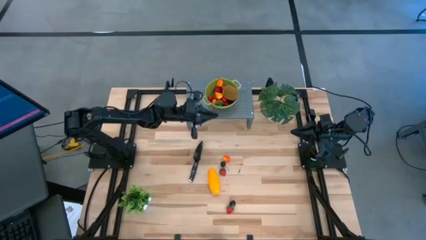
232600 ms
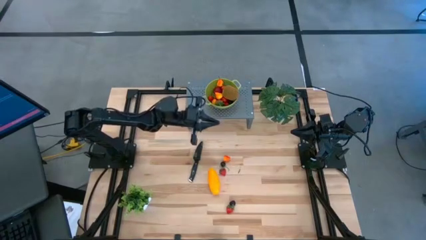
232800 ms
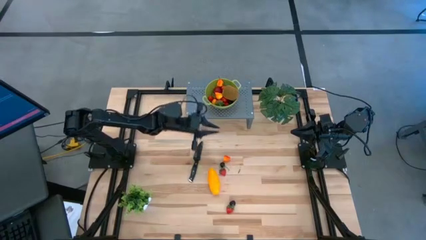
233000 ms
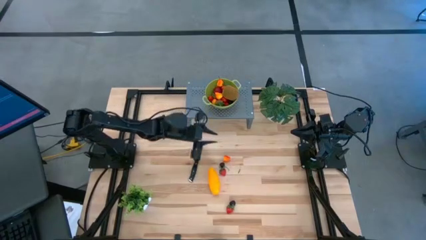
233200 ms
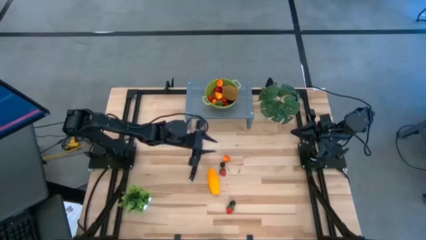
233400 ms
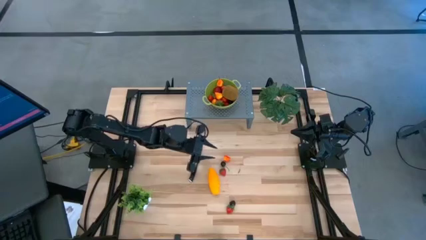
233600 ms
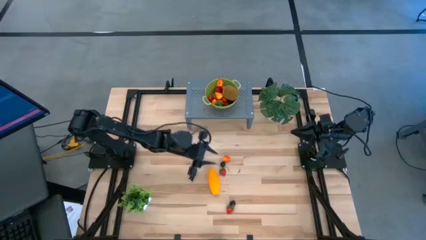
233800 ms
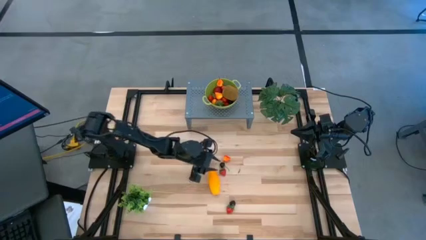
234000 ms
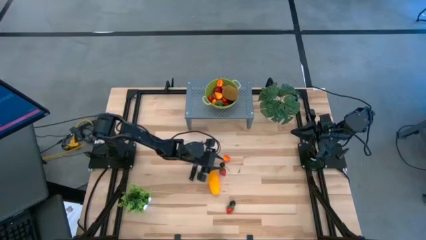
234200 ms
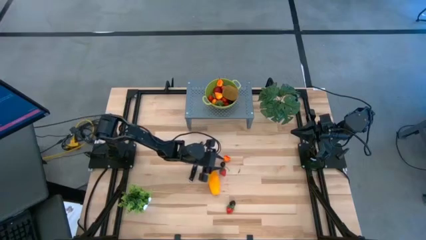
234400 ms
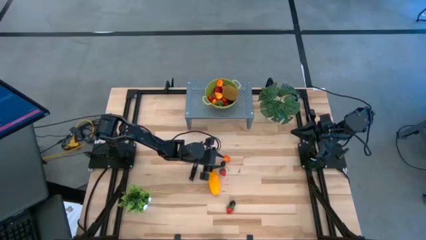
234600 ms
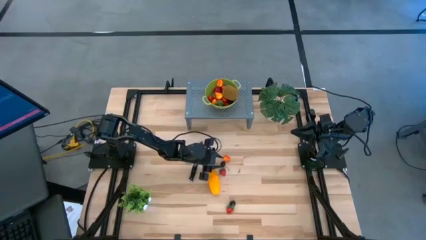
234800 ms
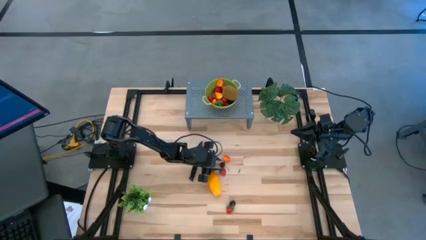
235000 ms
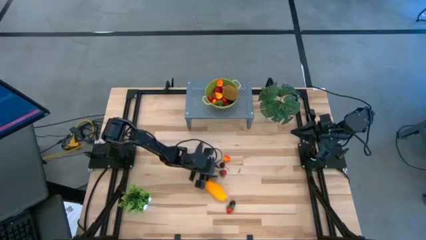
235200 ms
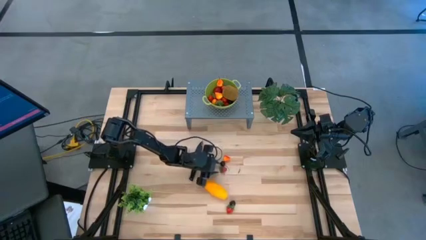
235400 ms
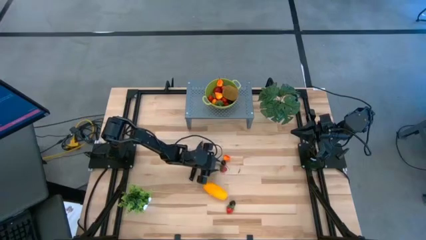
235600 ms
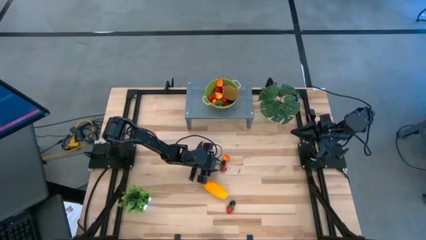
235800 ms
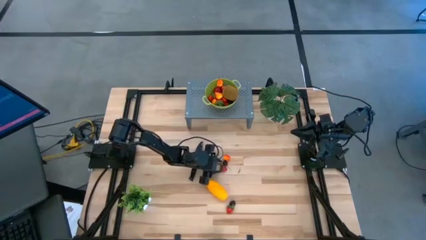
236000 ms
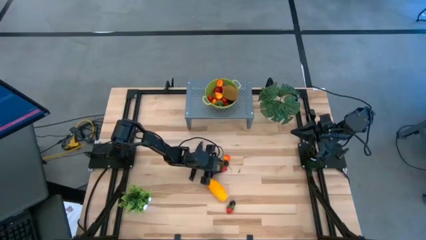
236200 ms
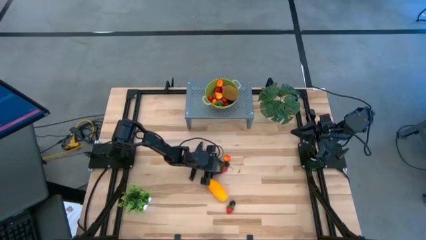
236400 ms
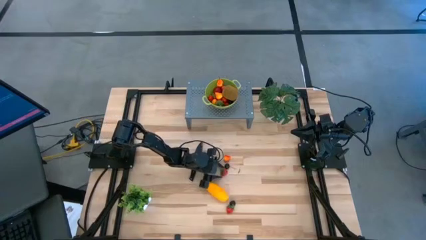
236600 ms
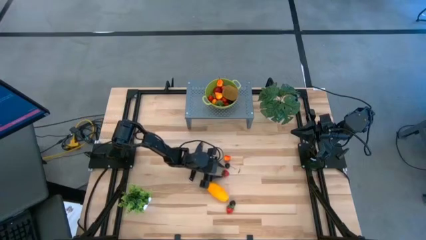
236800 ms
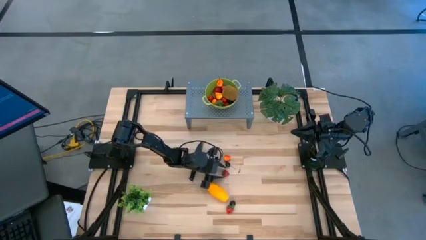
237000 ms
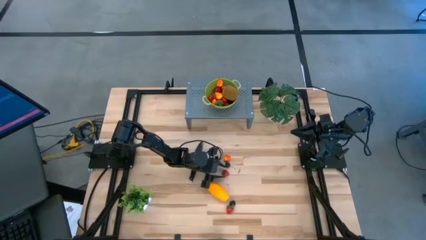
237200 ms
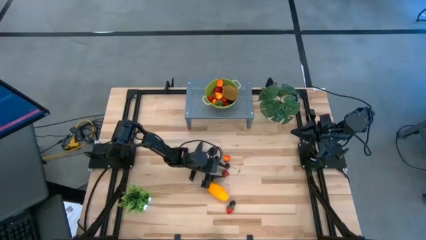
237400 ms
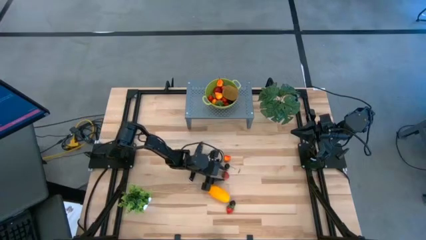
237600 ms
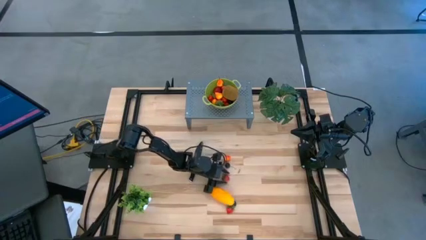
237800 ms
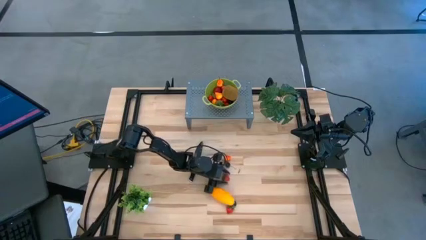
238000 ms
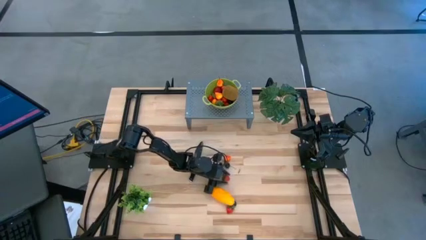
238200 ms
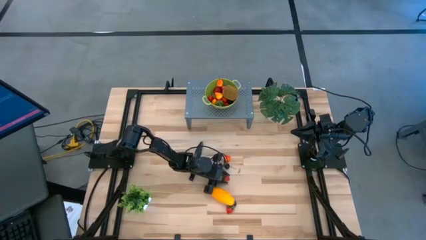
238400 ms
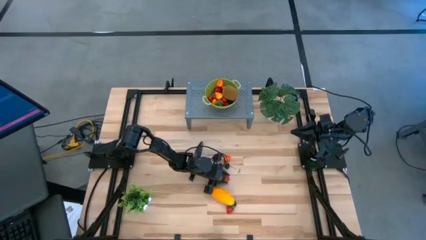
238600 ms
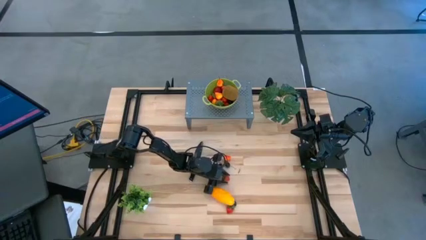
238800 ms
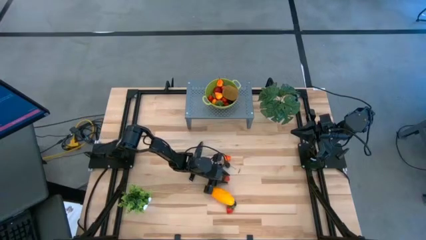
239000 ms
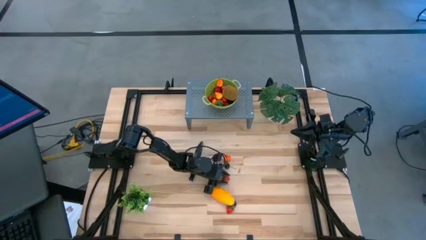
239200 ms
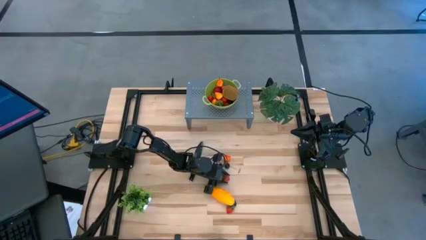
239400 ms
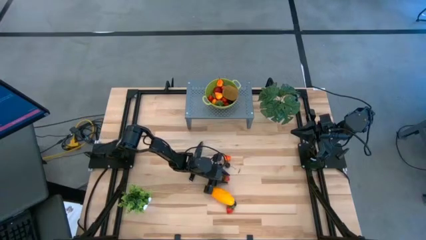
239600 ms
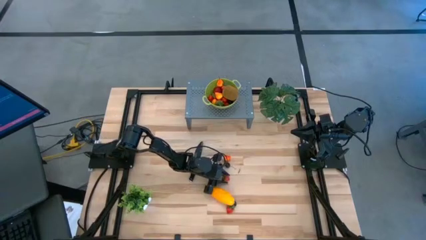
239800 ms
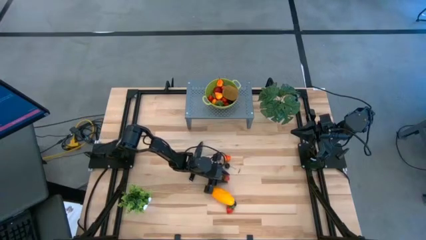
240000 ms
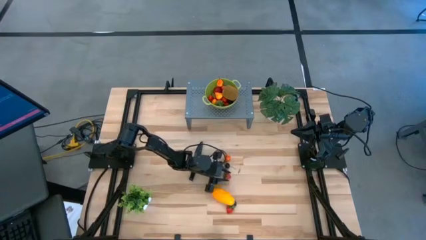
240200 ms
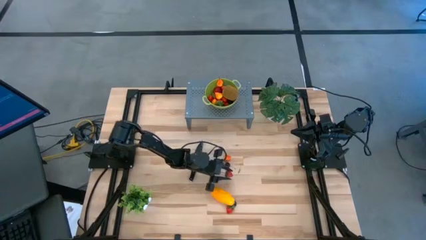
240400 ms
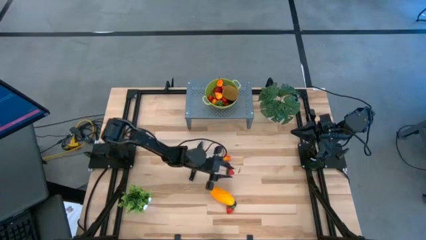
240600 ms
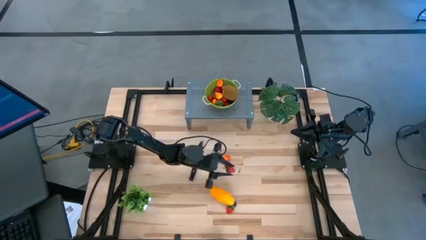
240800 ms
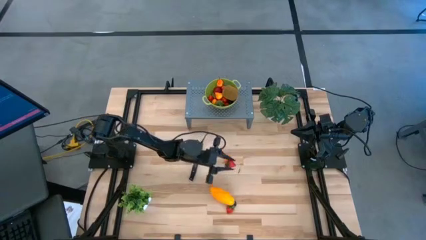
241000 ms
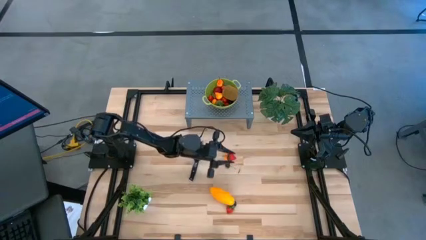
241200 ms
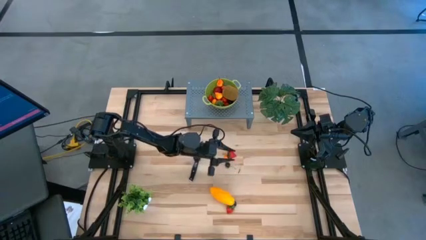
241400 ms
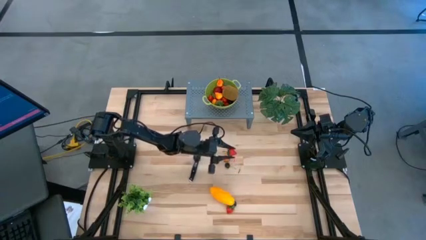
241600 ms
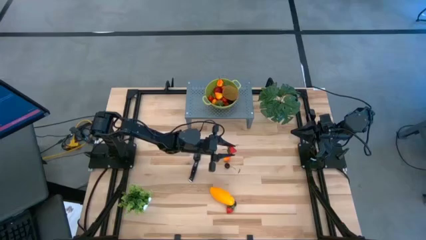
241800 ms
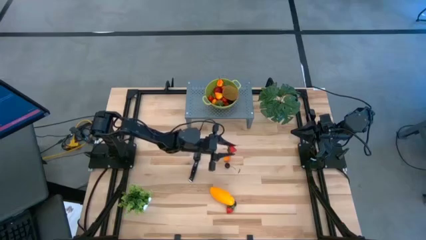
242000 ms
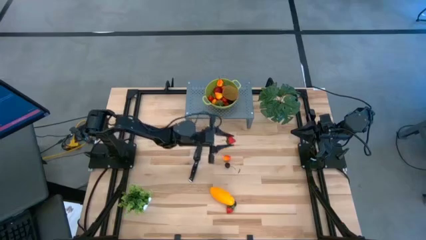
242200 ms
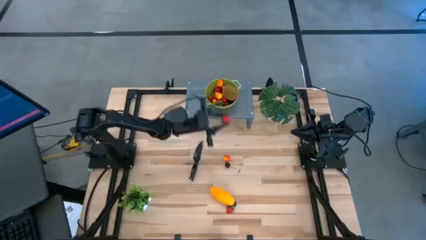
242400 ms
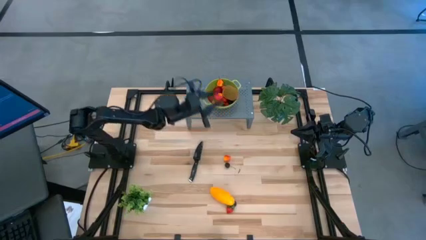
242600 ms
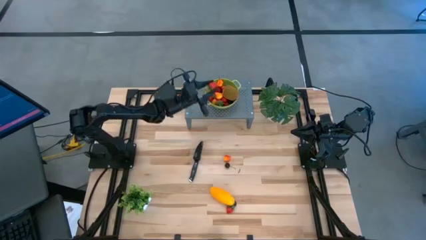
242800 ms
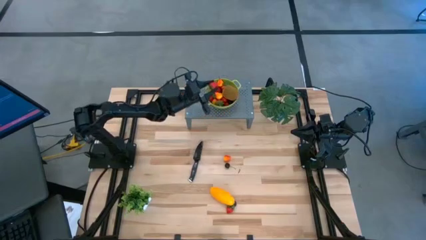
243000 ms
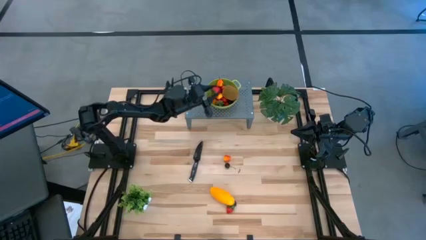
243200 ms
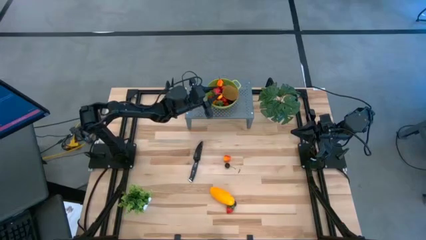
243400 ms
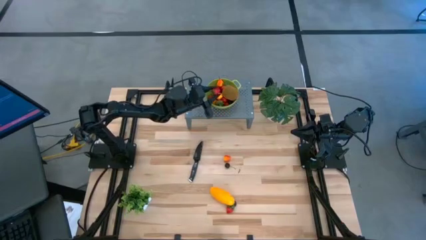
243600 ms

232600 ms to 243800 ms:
Task: Pick & Place Fruit
Put the strawberry into the green strainer bowl on the shelf

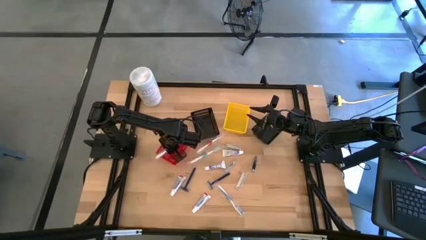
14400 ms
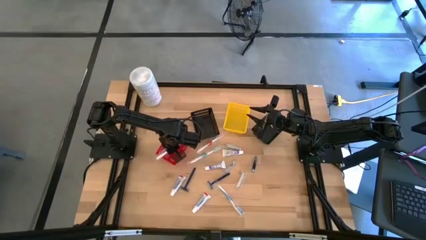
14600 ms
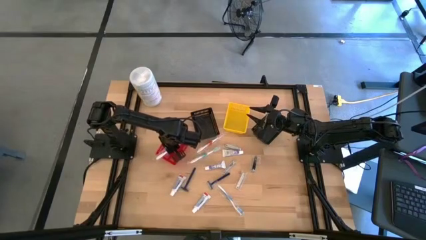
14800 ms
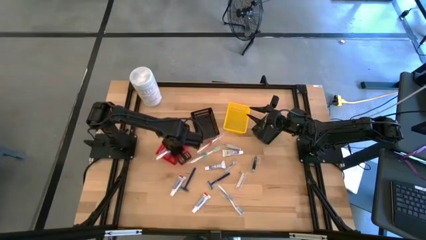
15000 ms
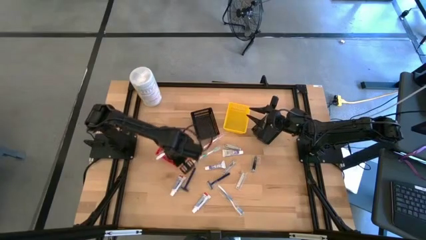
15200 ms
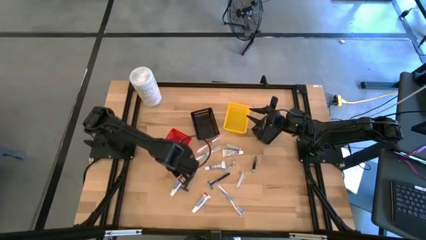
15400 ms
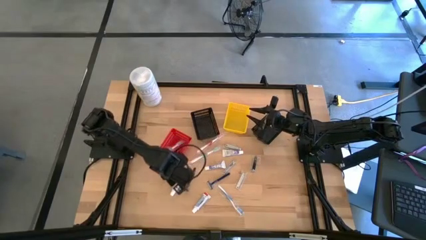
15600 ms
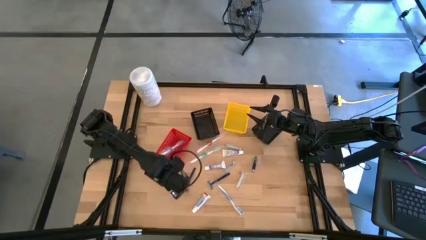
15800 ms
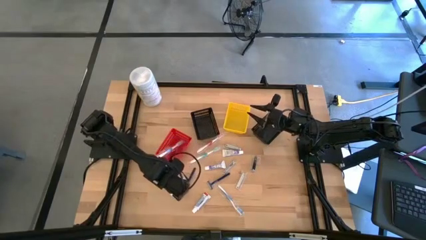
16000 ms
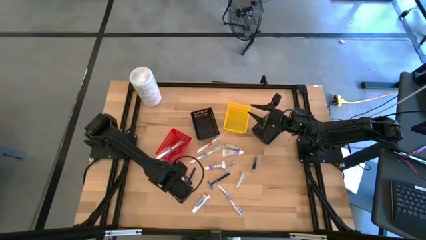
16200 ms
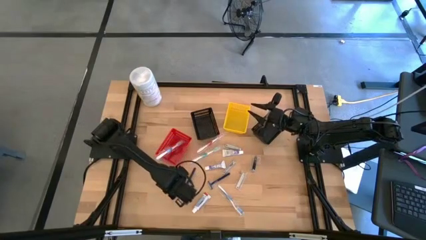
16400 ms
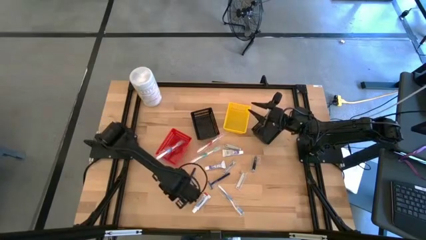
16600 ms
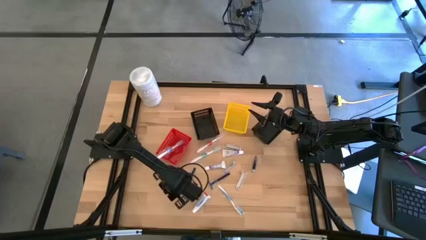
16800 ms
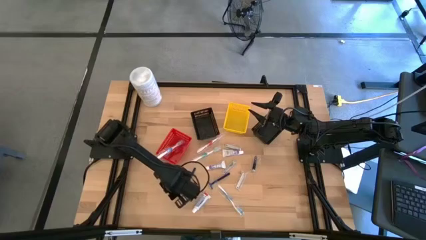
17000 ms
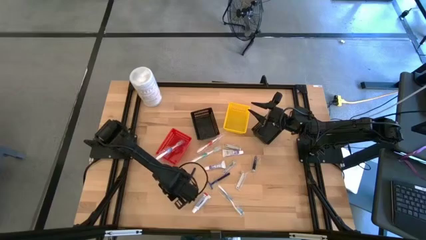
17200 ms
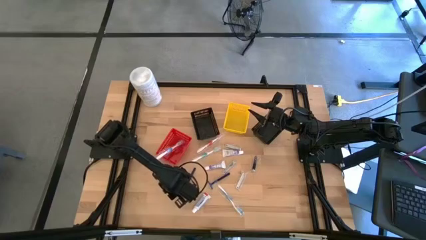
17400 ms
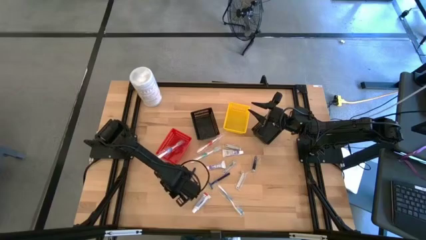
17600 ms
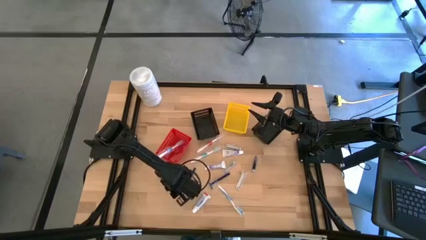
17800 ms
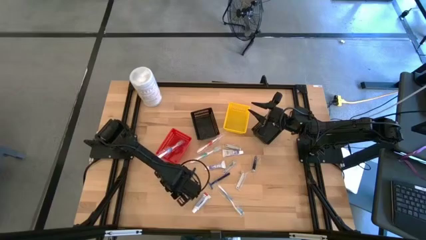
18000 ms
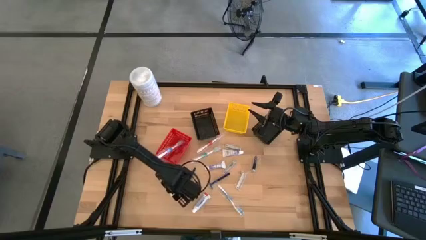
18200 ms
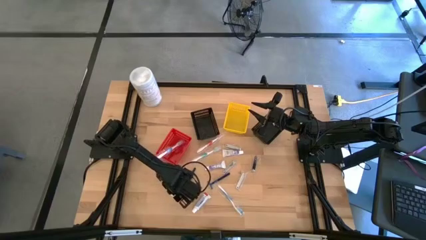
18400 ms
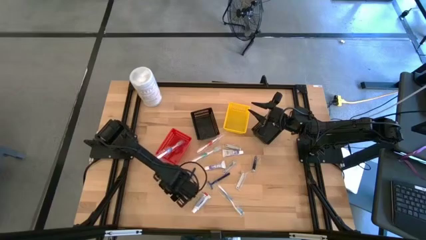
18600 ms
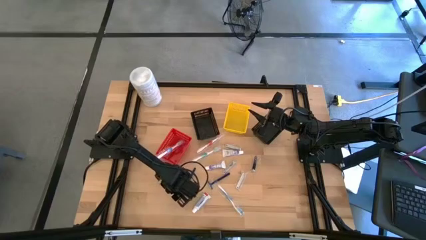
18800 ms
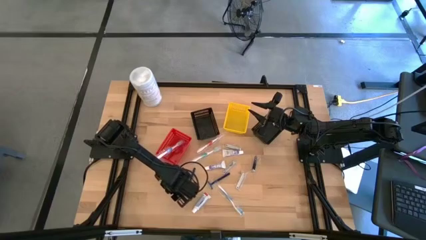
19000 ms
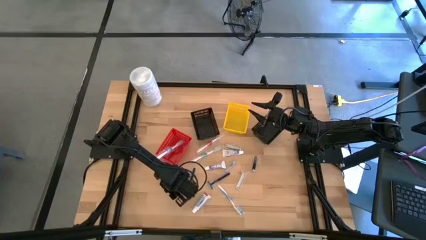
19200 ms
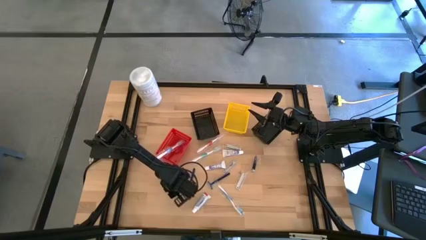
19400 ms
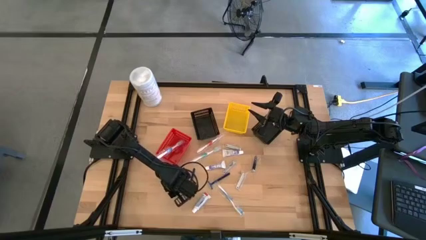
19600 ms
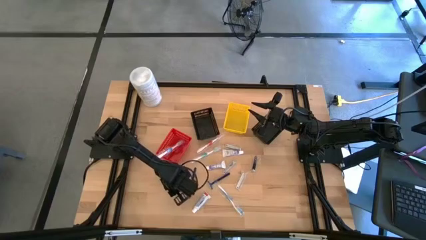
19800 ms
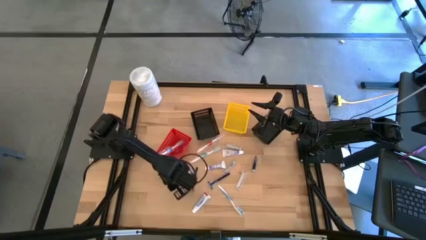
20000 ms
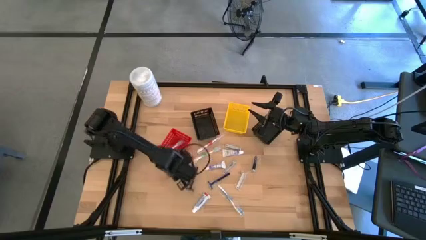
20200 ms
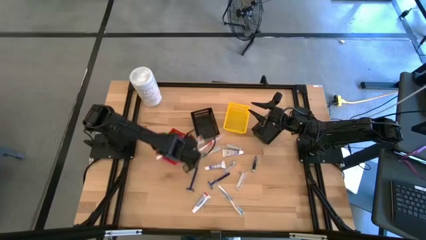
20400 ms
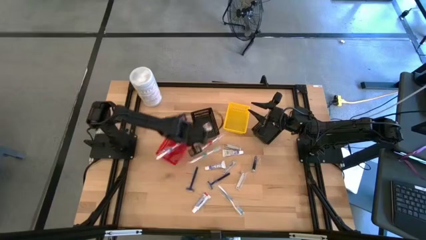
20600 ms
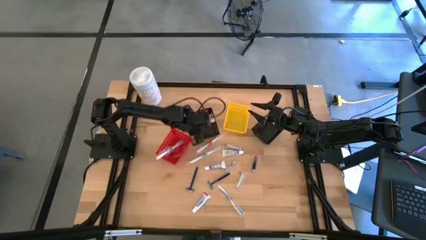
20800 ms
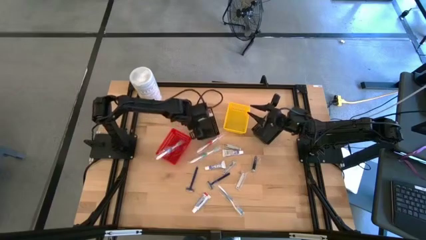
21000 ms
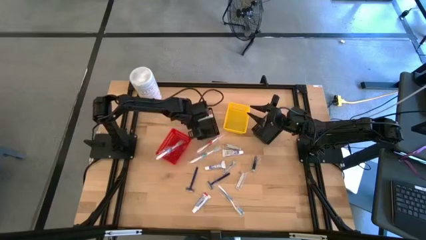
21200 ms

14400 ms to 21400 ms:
Task: Pick & Place Travel size toiletries
Put the toothpaste into the left black bin
